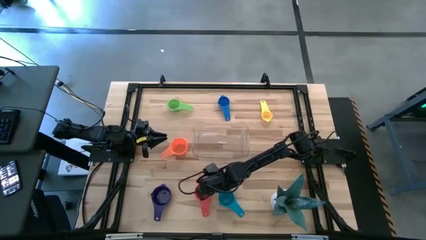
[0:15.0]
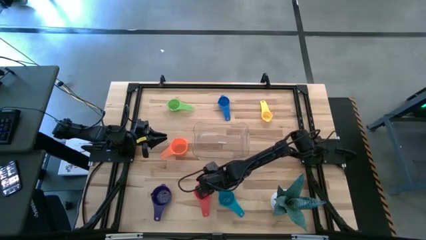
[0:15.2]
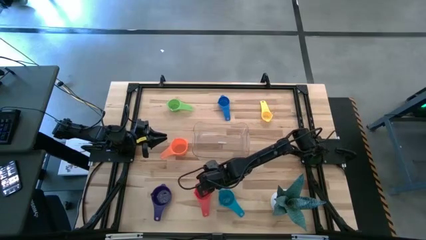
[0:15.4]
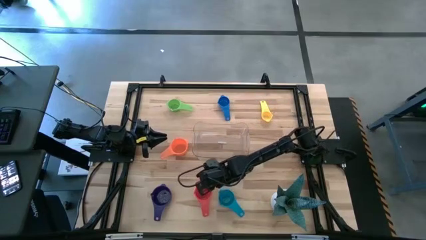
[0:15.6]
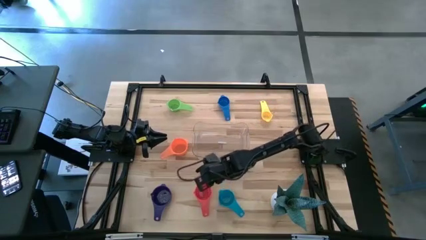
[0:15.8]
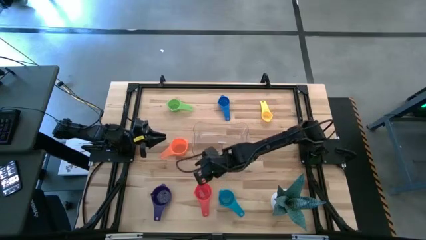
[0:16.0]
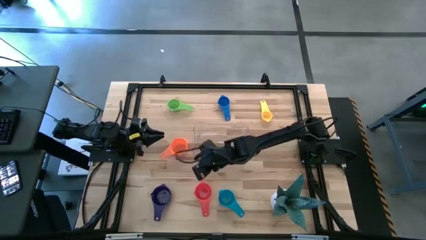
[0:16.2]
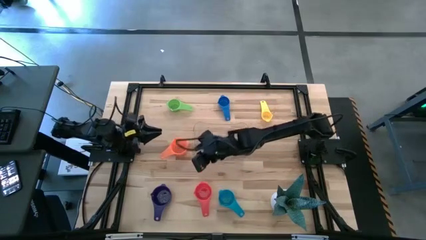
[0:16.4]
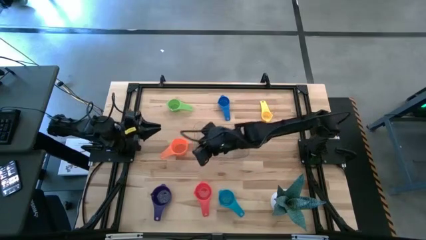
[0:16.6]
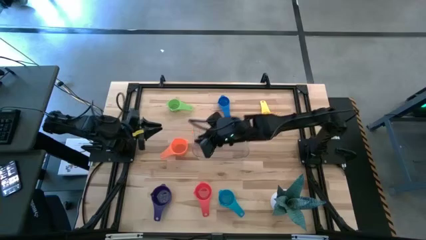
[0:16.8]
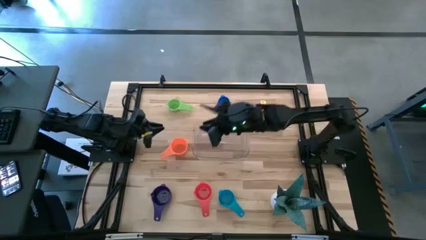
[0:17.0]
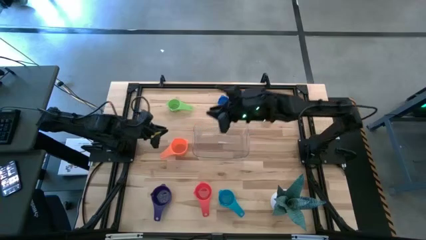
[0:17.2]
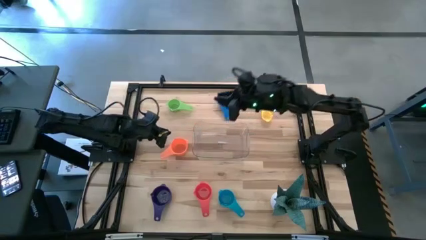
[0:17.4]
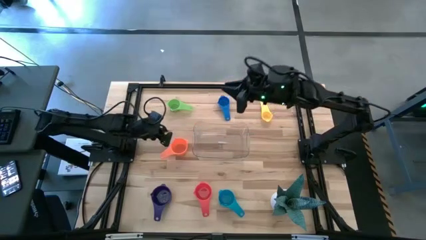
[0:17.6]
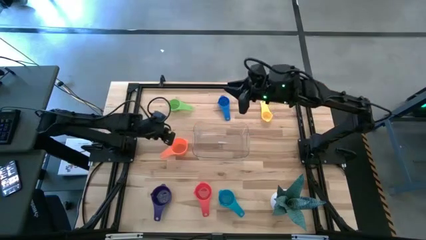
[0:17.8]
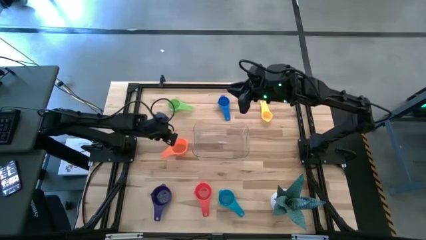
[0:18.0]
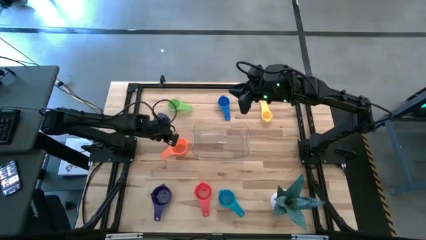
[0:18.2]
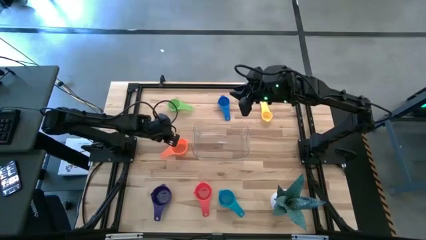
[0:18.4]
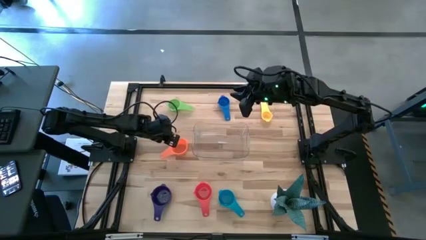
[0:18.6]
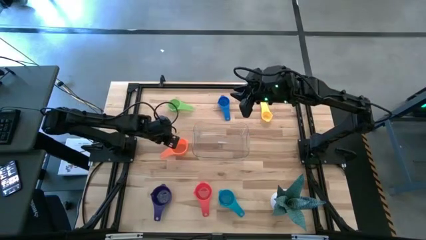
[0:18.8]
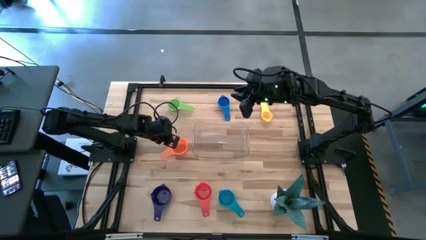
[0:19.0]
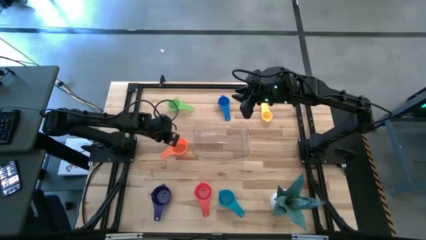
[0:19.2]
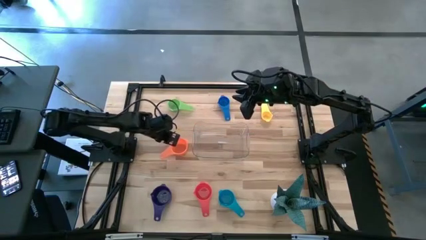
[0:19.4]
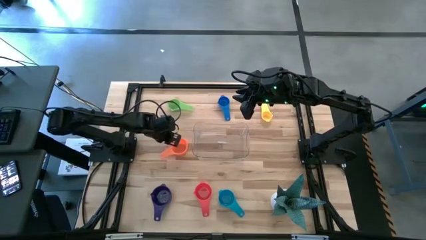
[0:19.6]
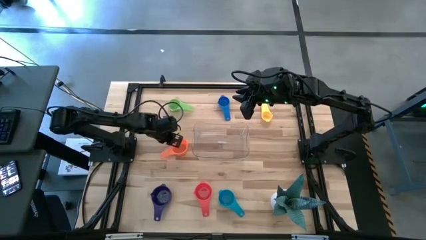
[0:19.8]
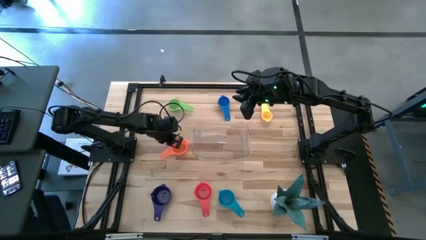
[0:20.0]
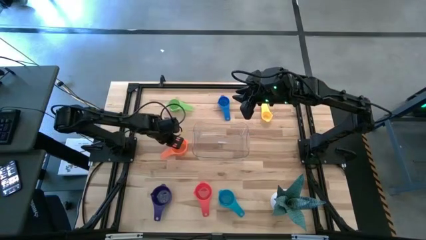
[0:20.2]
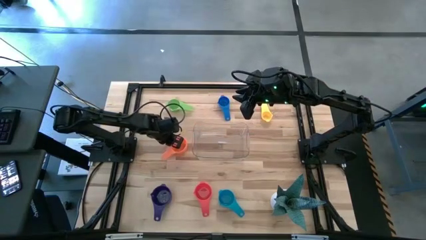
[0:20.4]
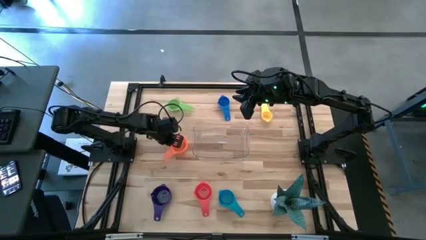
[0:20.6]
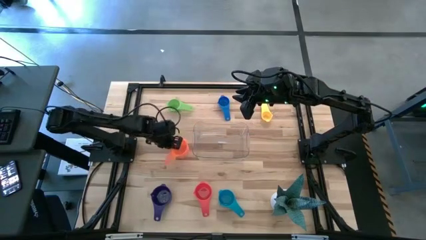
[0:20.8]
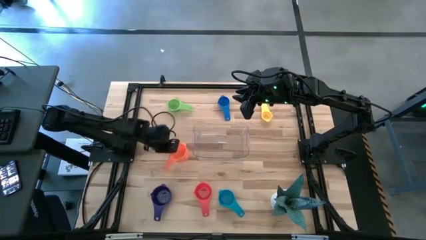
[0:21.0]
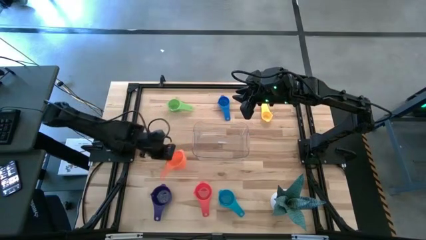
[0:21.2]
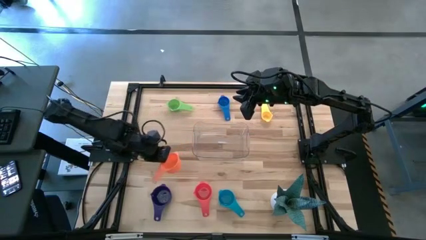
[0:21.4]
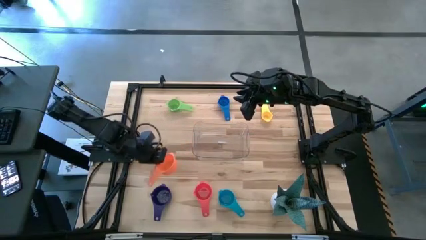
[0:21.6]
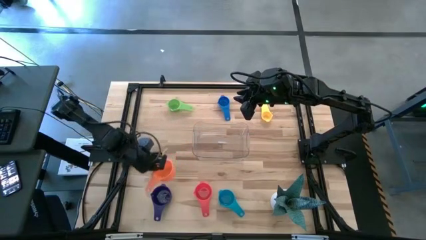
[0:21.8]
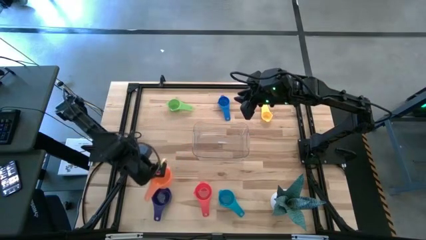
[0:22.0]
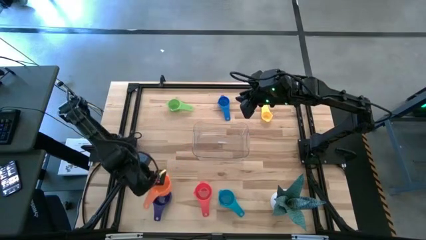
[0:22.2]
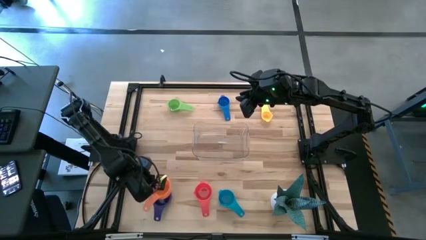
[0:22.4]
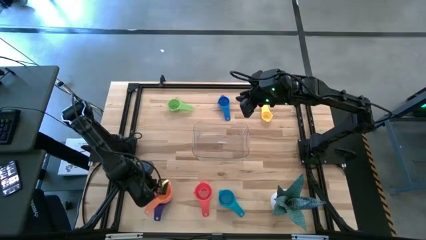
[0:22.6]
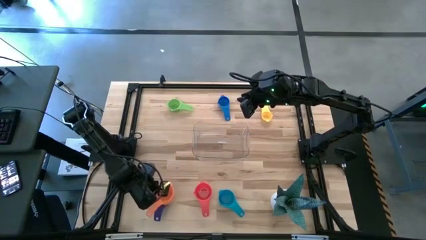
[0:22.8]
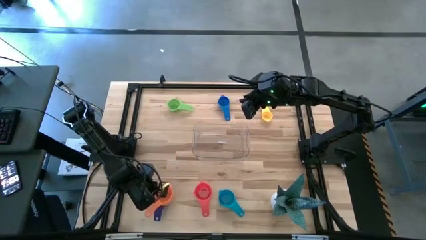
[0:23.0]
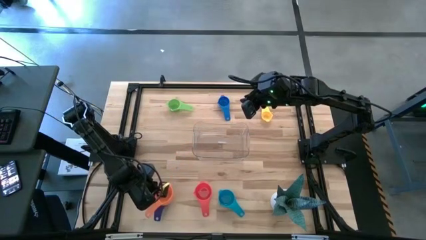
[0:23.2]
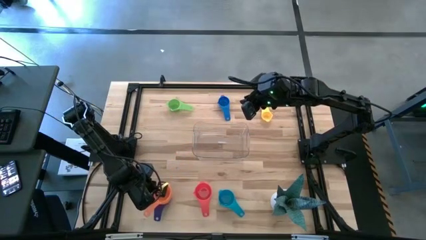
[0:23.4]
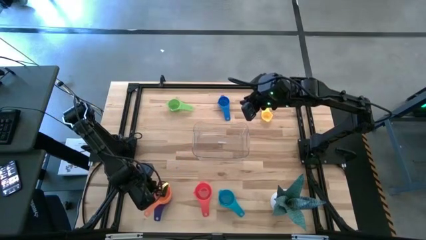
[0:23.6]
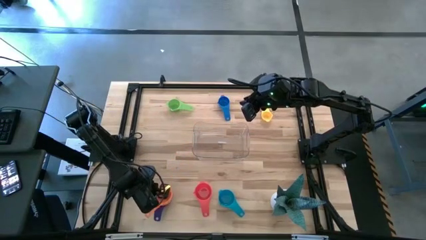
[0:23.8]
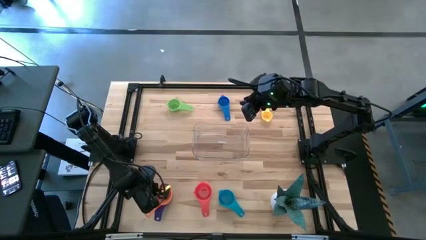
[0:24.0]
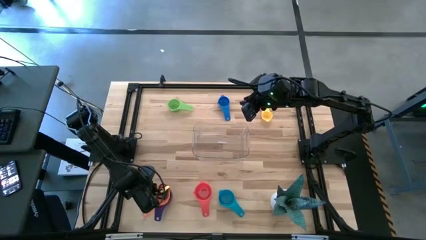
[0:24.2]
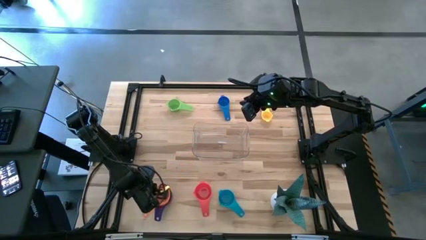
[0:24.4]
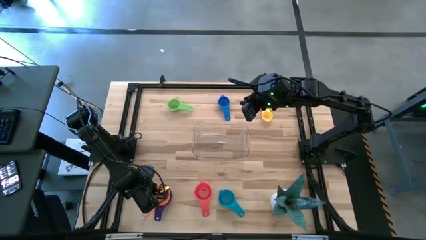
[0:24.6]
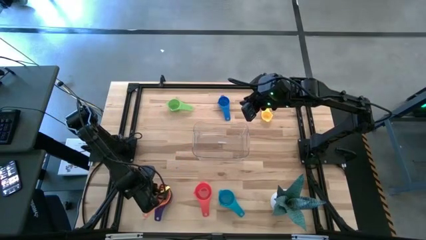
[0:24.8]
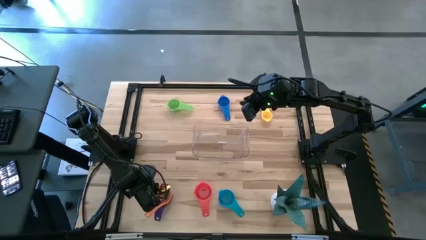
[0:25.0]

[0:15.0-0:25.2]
Task: Nest measuring cups in basket
Stack the orange measuring cup into the violet measuring cup

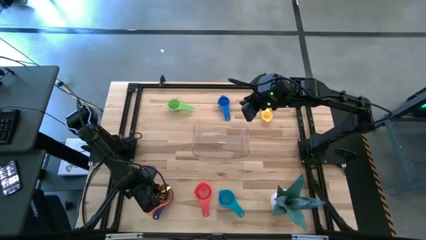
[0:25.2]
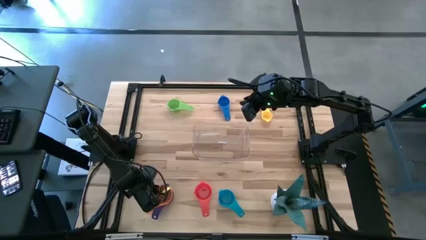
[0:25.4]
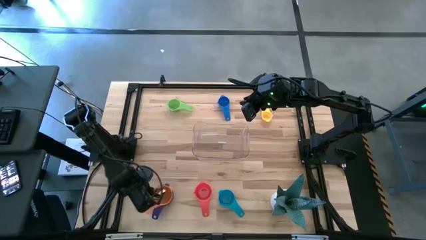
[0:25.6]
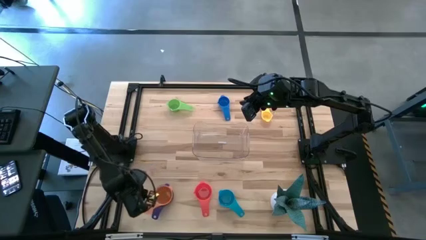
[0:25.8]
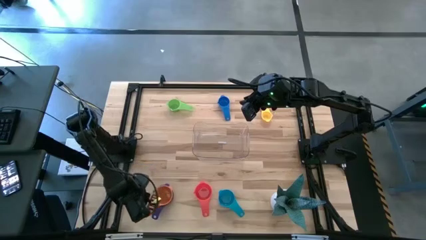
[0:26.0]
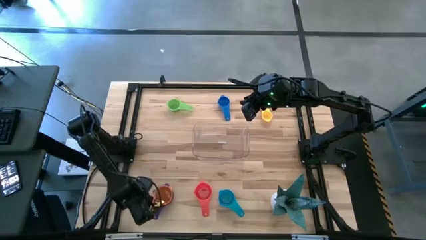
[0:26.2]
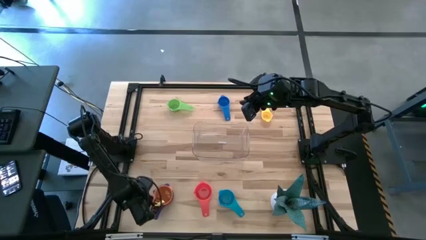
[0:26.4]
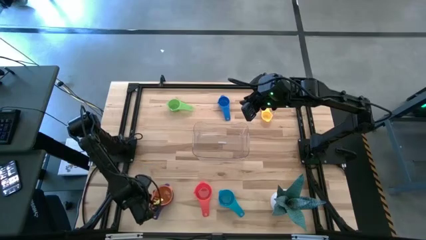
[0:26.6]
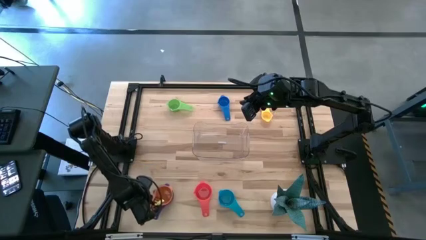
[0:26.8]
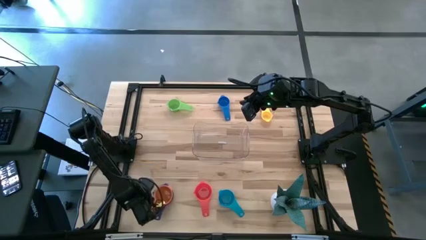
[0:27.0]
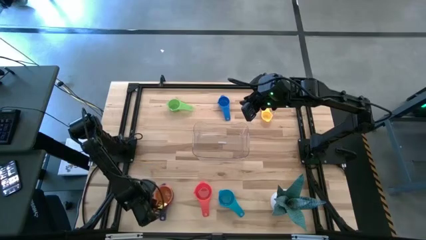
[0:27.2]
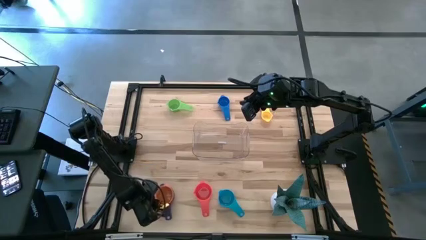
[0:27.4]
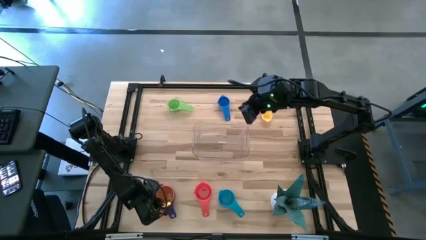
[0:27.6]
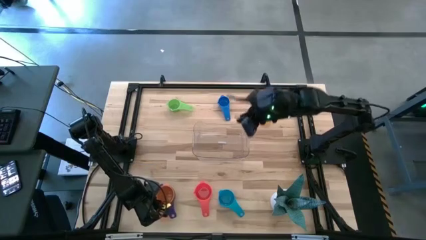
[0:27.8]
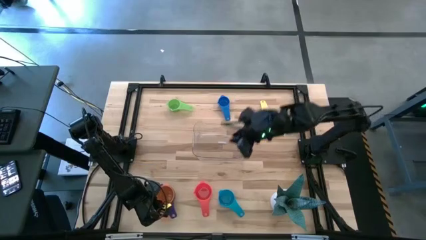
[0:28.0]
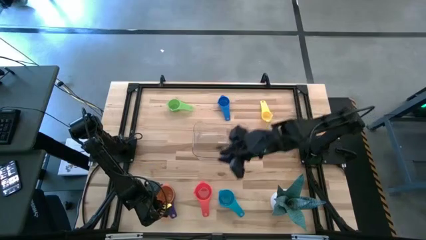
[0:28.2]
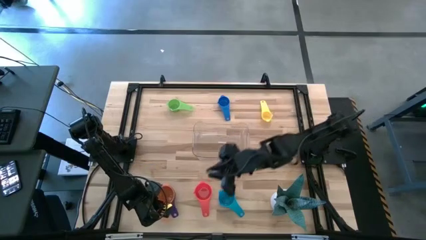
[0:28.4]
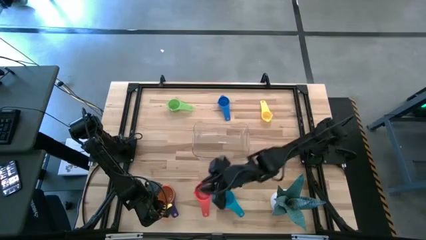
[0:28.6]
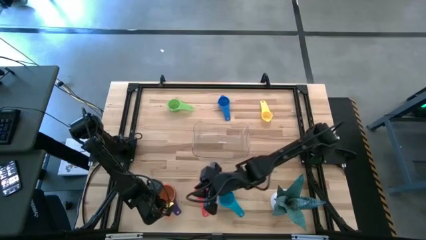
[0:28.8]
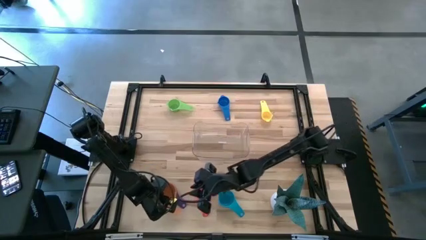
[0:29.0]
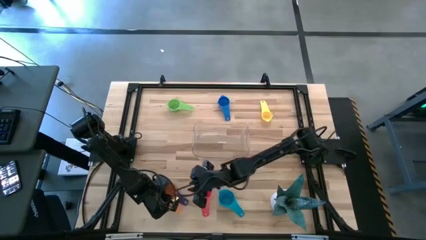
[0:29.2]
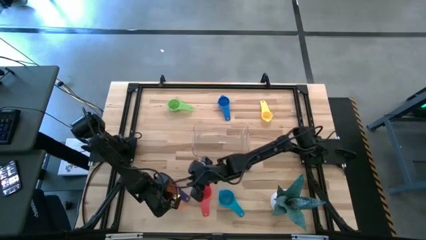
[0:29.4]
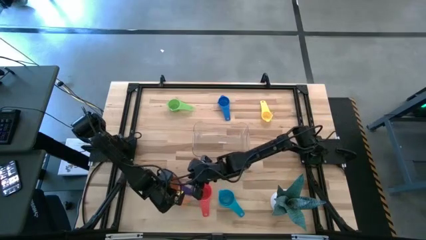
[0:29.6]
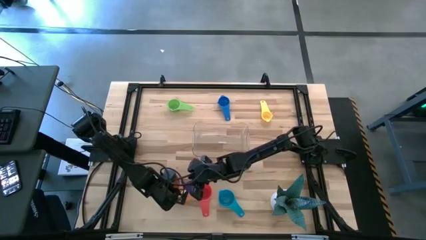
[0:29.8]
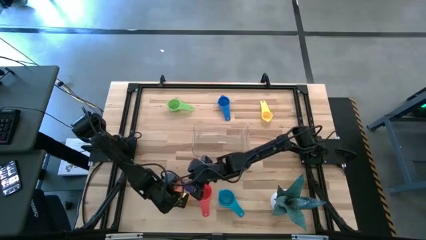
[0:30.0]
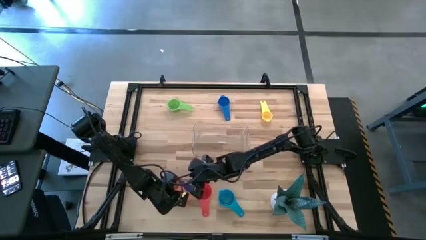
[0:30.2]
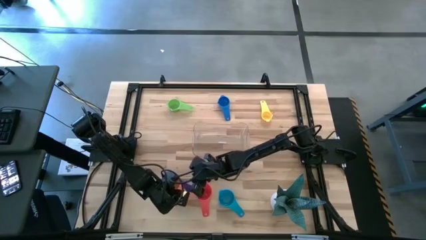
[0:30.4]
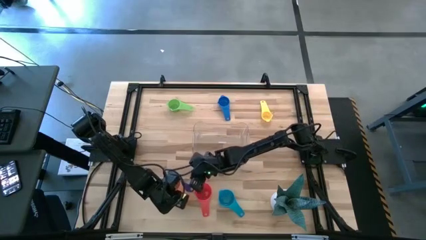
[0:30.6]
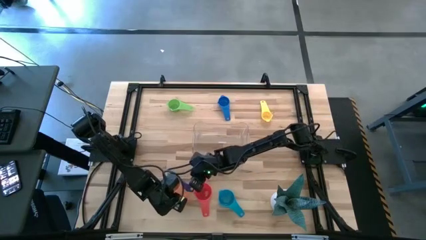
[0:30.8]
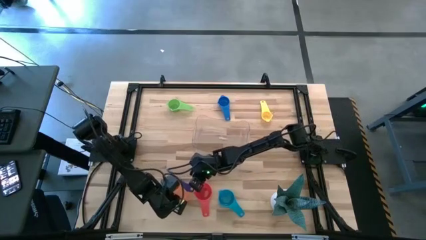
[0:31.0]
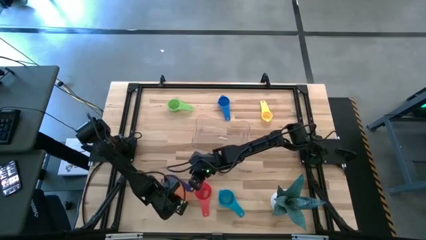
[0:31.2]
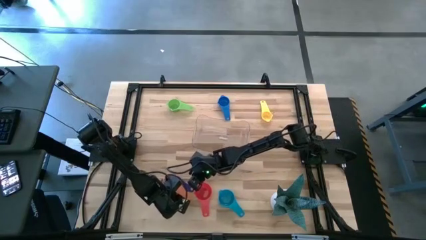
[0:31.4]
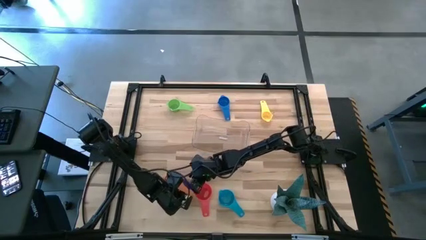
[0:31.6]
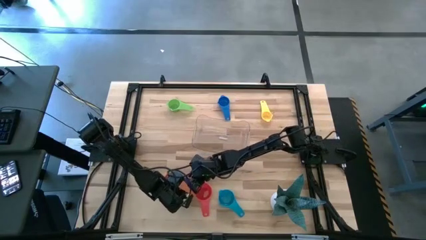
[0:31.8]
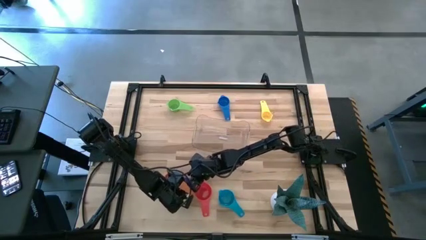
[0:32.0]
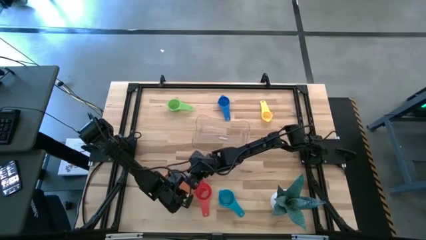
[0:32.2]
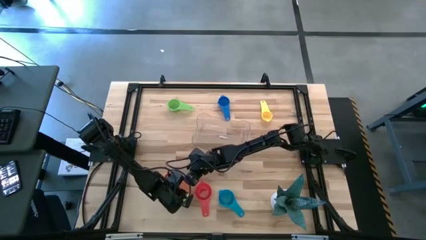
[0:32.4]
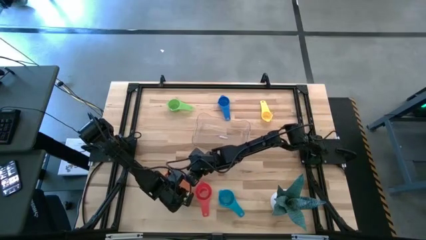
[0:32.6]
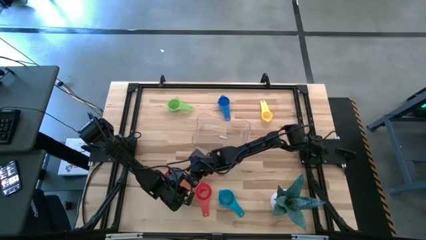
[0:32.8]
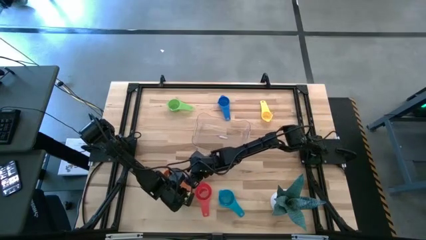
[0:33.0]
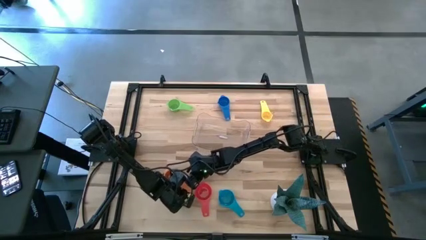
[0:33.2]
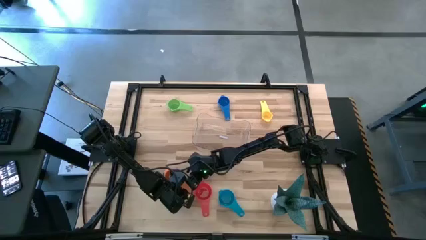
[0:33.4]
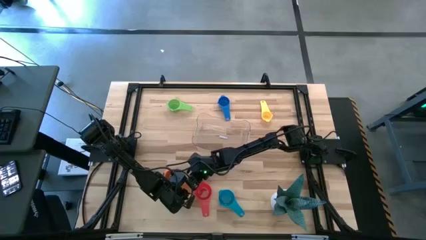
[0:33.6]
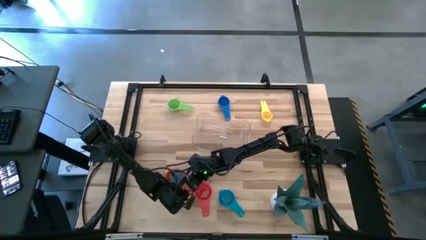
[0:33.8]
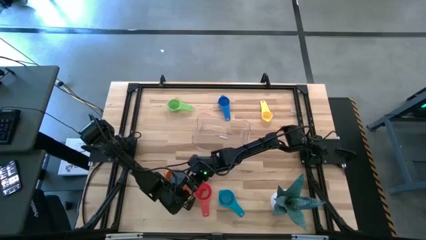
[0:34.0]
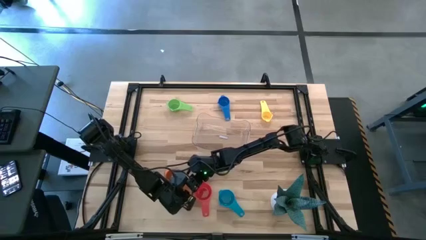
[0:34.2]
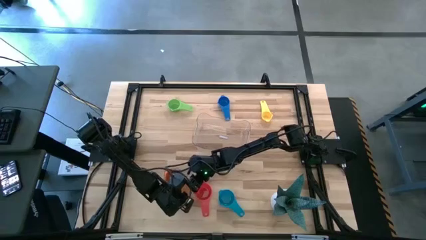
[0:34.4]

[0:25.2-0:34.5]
Adjust the stacked measuring cups
